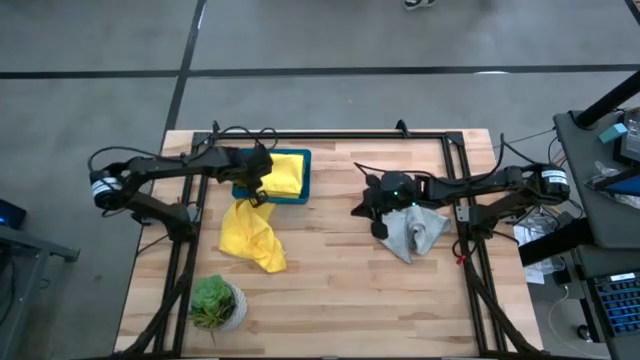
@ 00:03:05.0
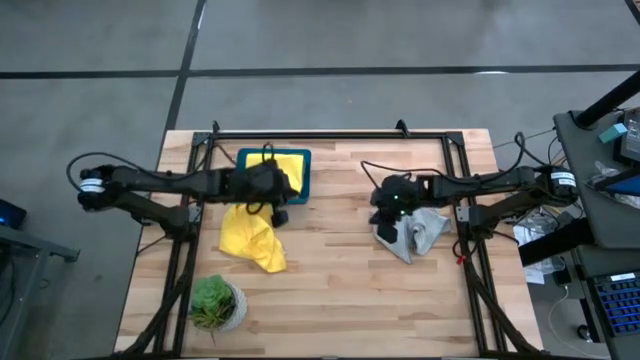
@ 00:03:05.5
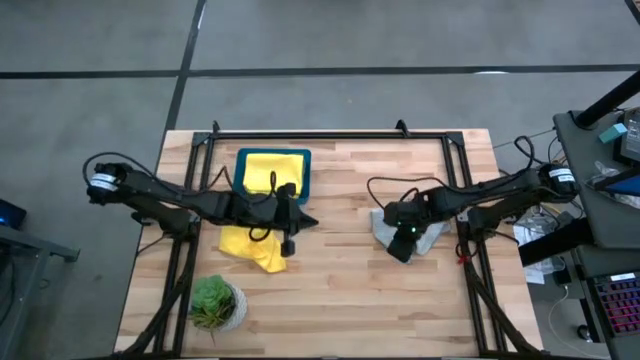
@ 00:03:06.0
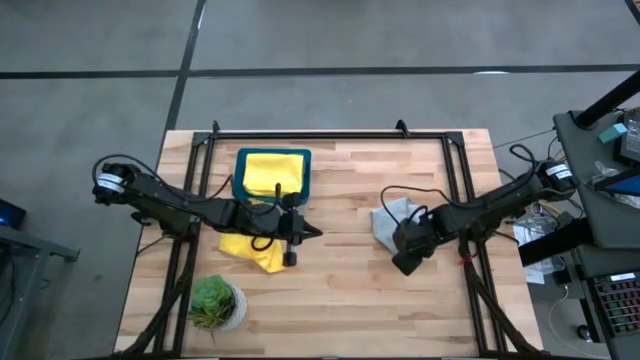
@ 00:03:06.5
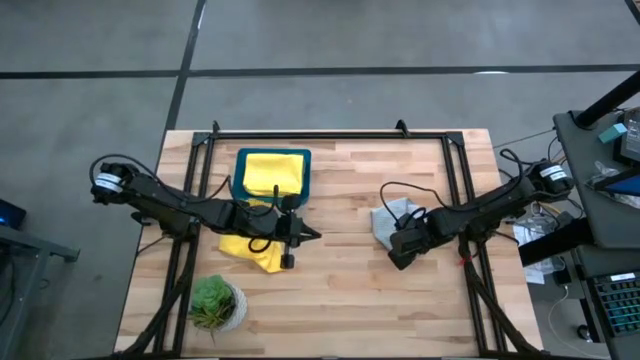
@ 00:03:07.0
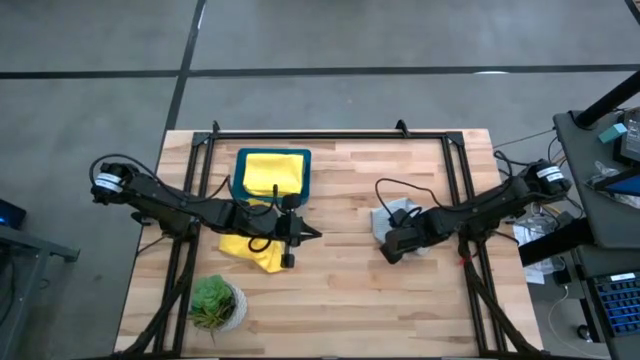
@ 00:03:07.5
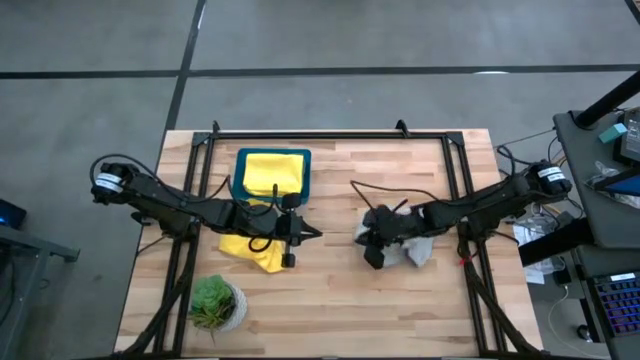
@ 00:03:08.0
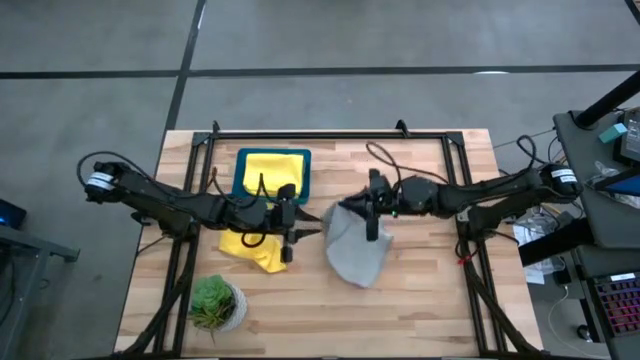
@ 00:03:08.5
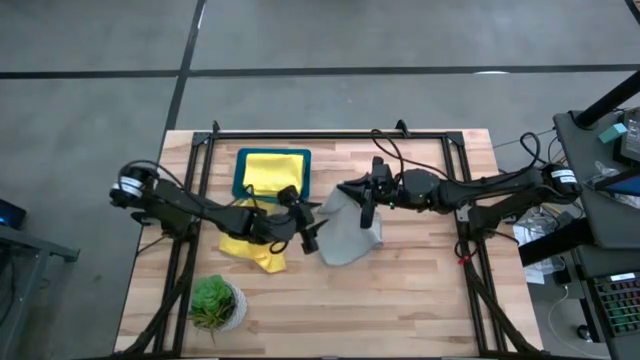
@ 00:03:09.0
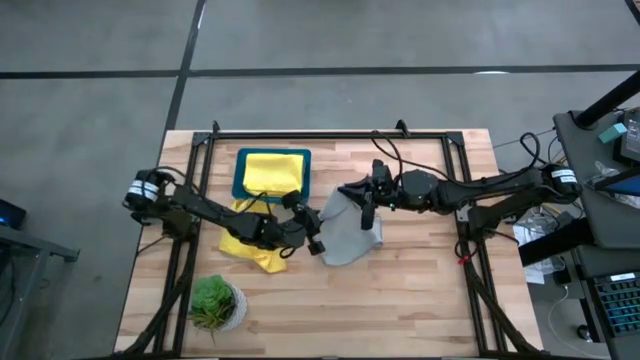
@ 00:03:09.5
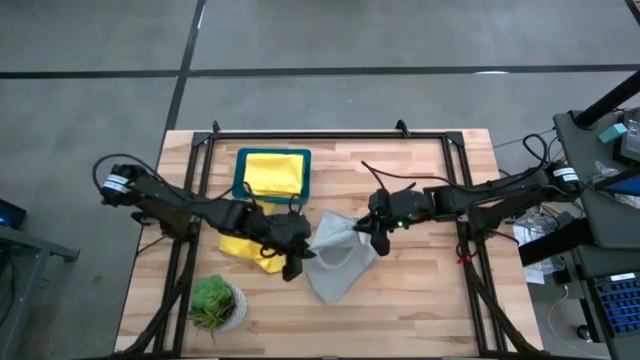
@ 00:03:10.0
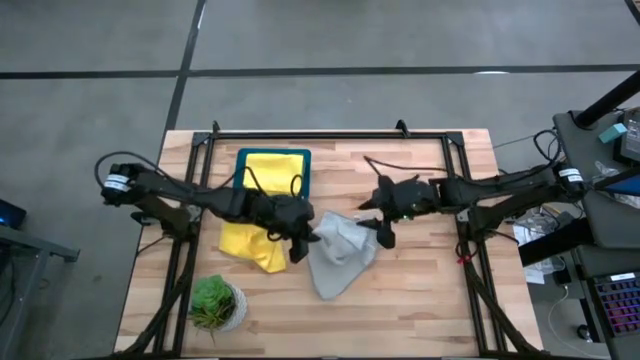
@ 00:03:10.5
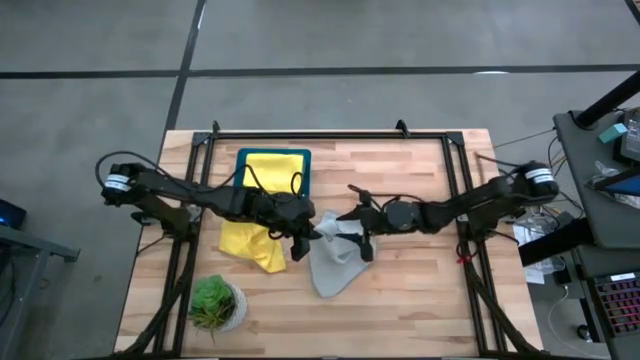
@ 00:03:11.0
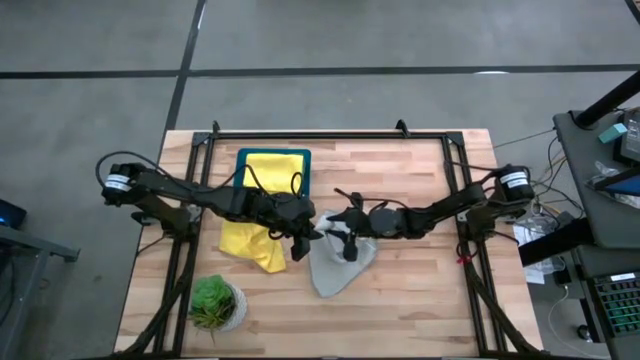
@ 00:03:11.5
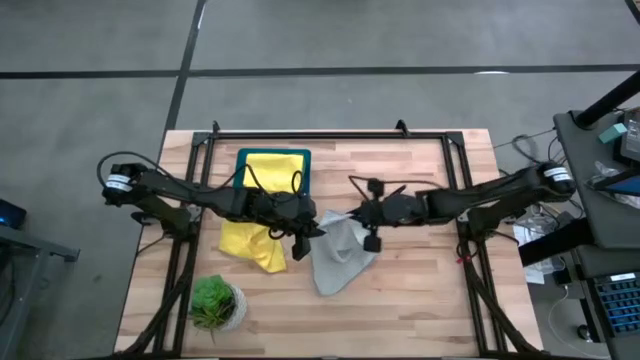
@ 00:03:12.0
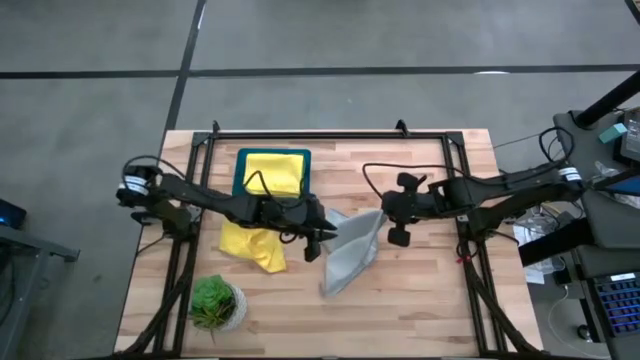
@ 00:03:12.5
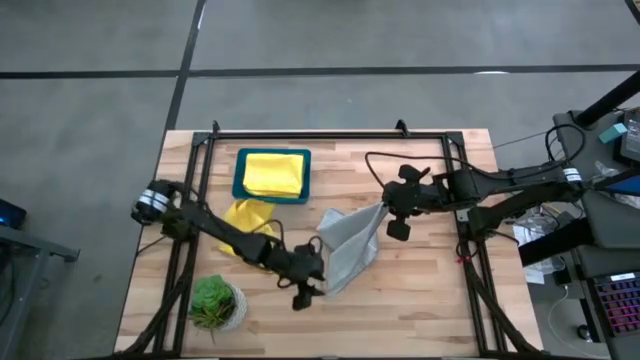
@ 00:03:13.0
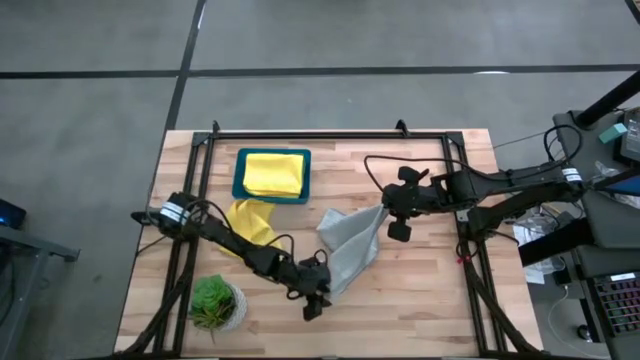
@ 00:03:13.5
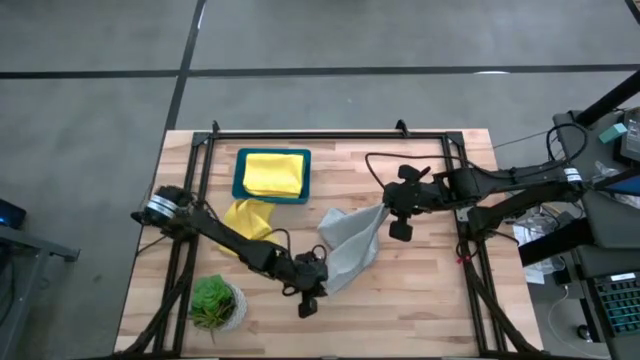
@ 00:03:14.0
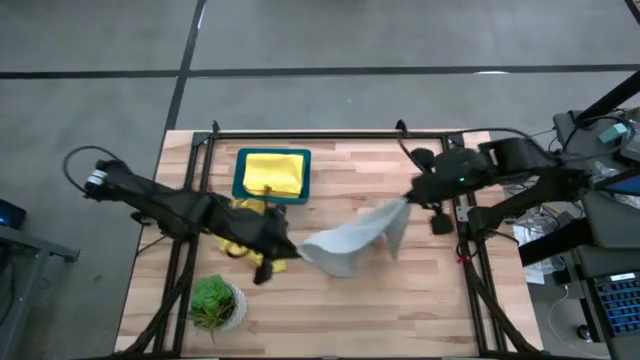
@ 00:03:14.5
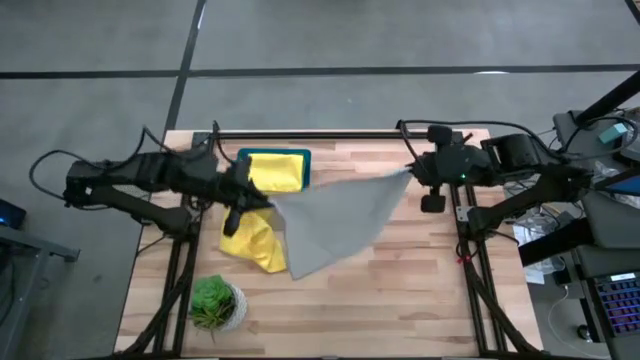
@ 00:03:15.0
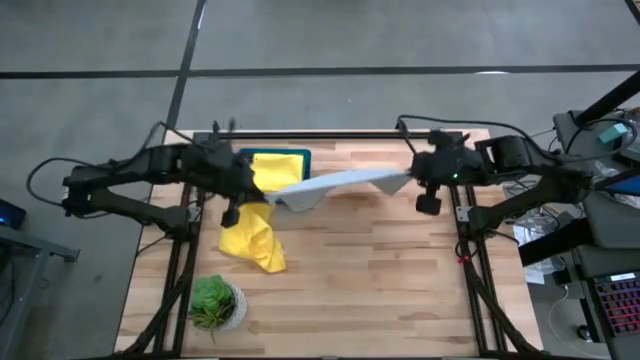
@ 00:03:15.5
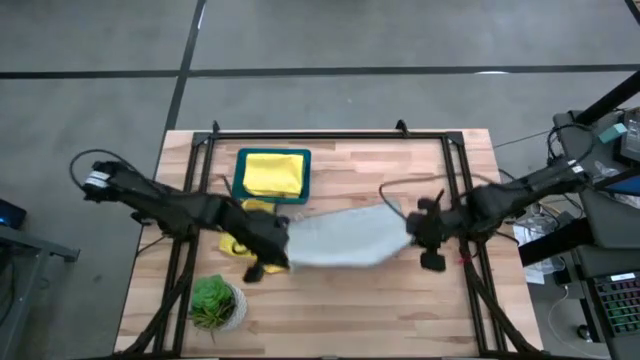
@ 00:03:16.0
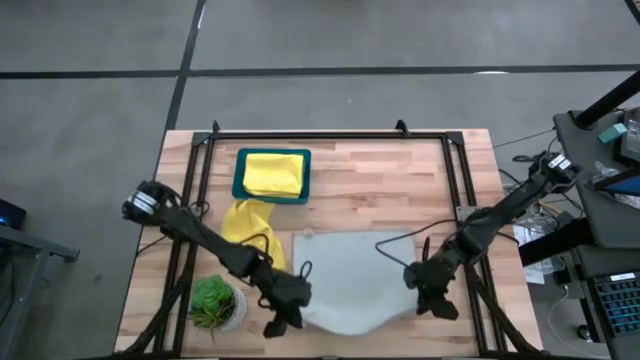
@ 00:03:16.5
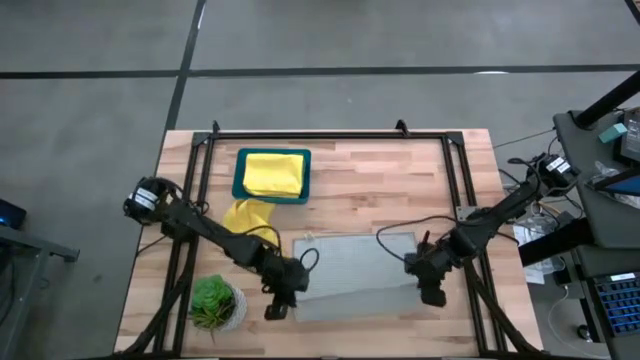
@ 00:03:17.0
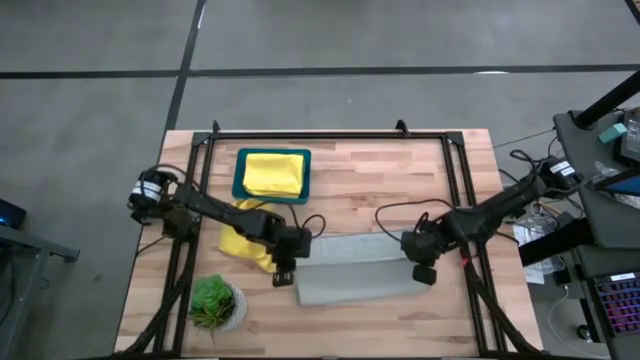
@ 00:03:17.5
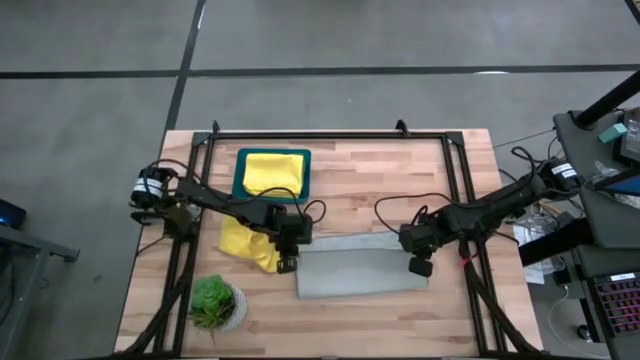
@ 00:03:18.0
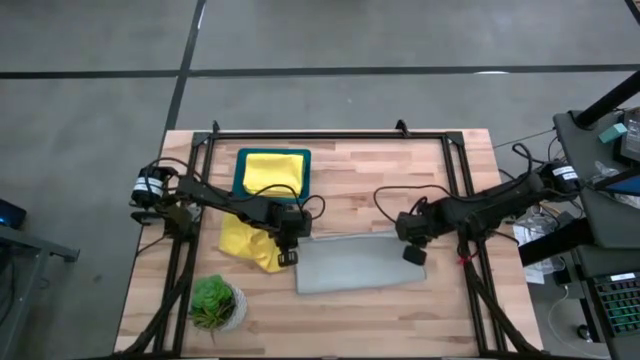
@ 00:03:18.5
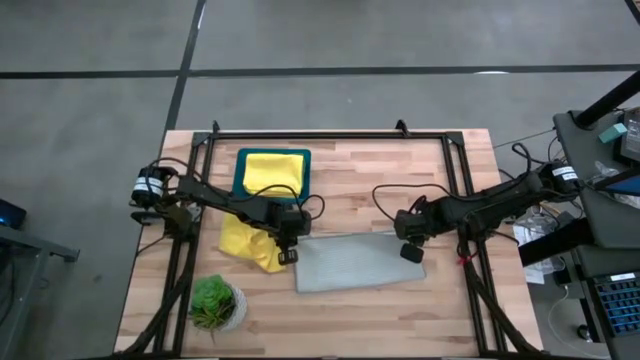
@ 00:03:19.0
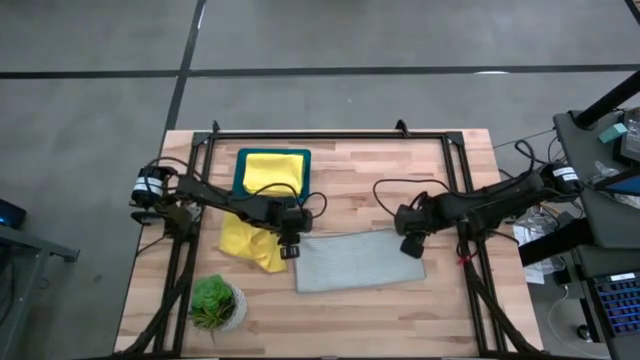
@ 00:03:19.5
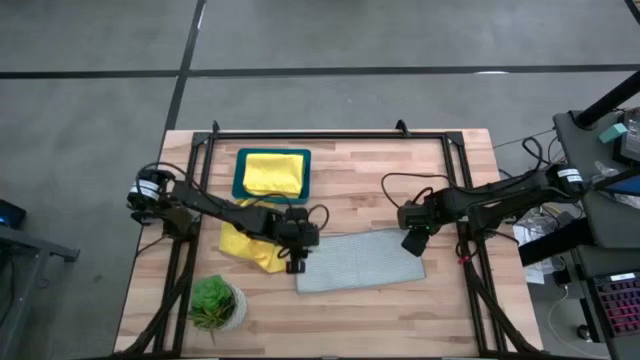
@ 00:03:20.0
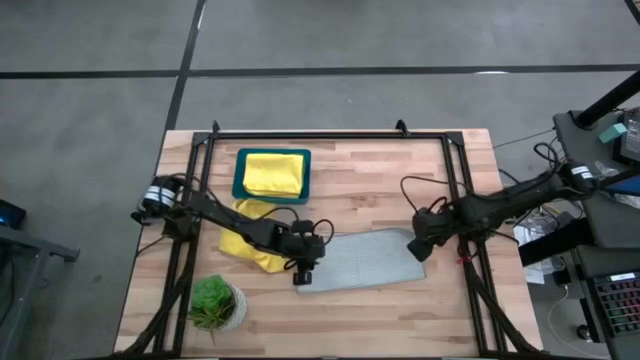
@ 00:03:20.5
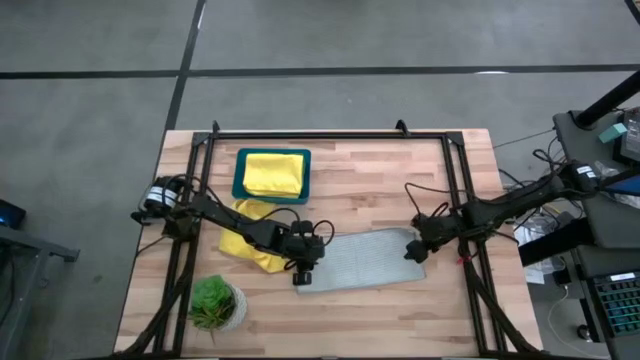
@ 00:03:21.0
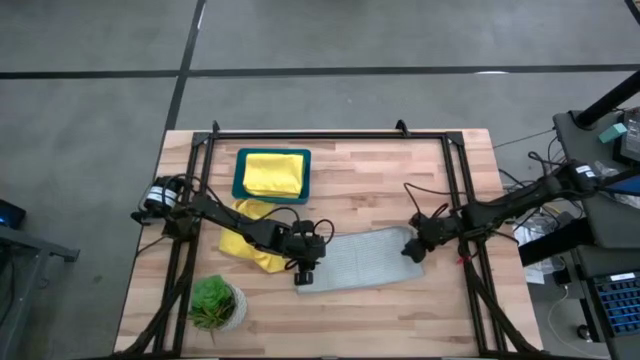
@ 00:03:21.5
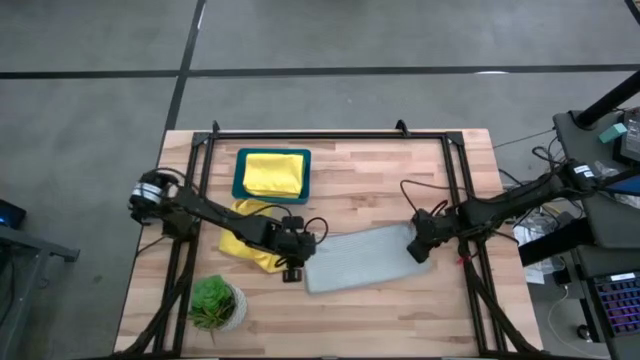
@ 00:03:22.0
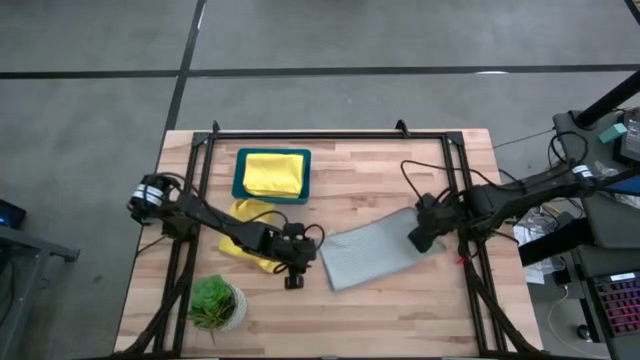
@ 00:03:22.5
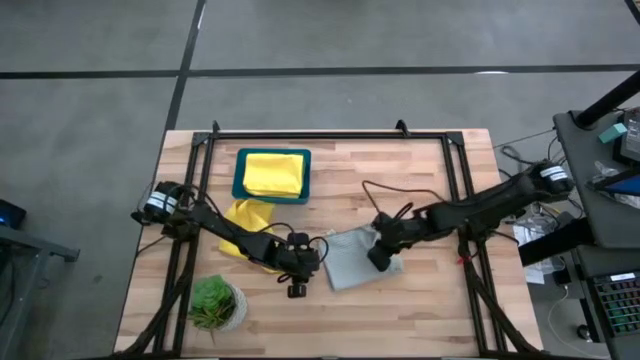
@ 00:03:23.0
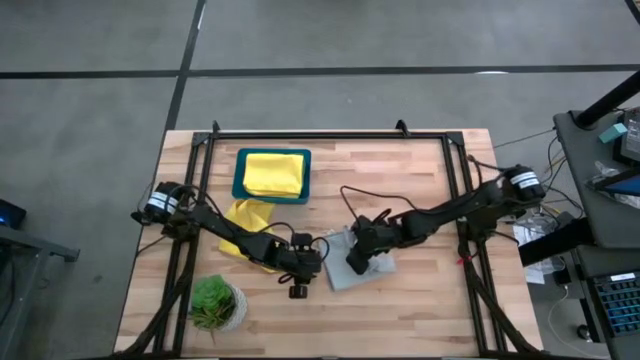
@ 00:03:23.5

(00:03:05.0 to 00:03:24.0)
Task: Fold microfiber towels
Fold the gray microfiber towel

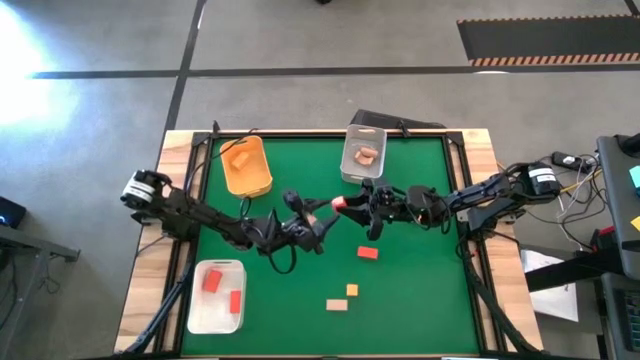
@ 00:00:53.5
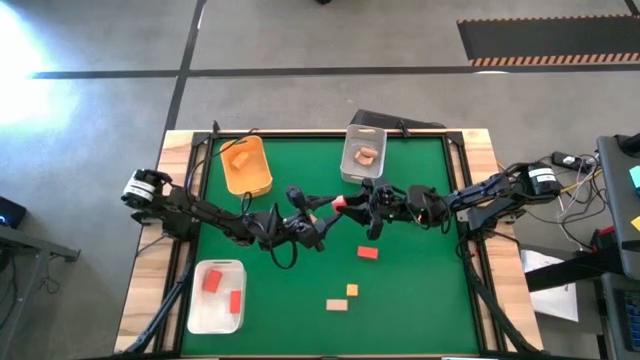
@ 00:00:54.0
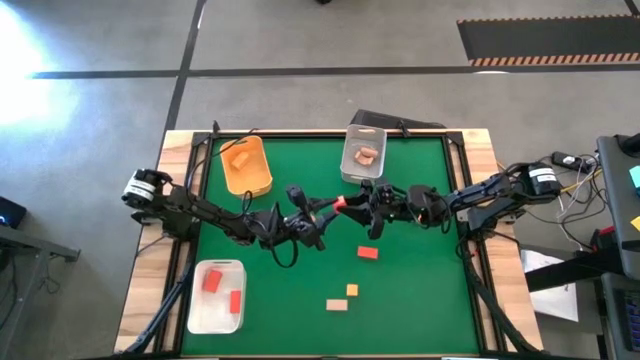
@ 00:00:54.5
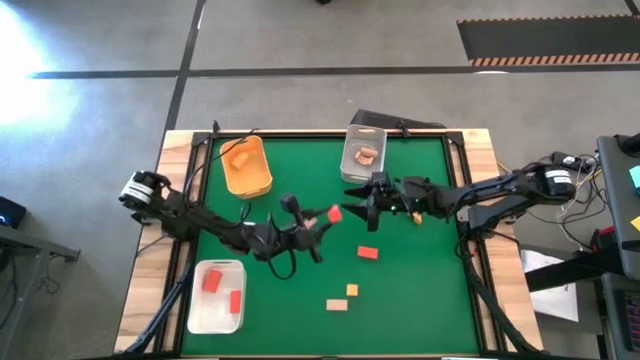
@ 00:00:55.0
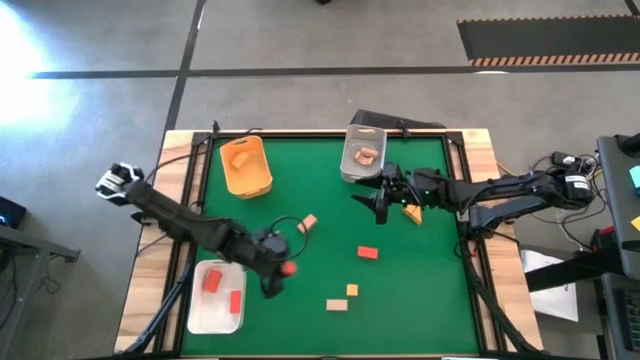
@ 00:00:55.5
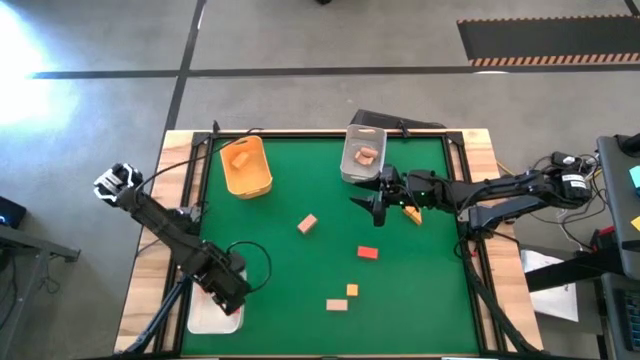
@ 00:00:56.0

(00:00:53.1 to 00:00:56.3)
Task: Sort & place blocks by color
Put the orange block into the white bin
